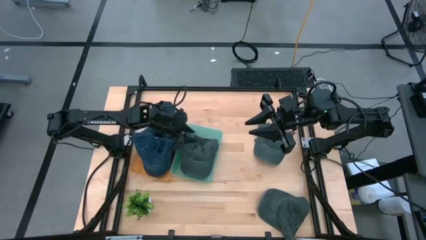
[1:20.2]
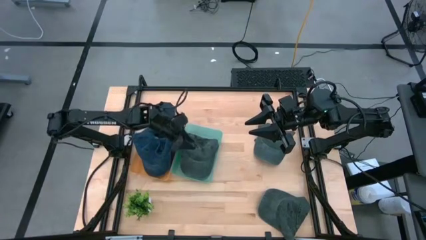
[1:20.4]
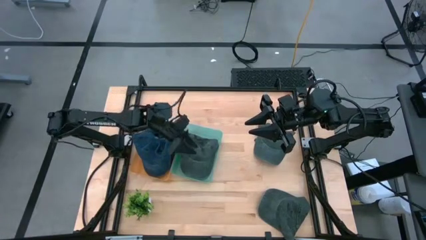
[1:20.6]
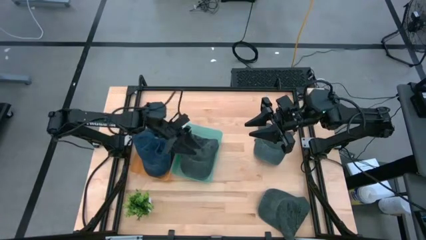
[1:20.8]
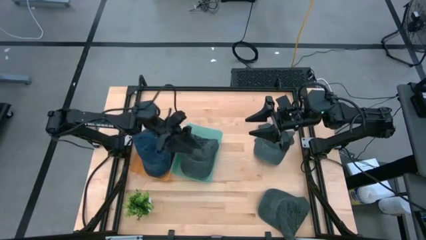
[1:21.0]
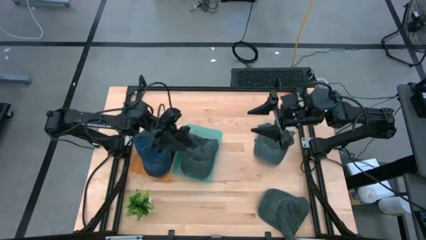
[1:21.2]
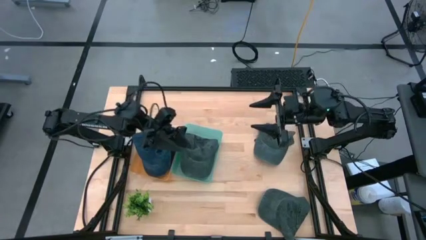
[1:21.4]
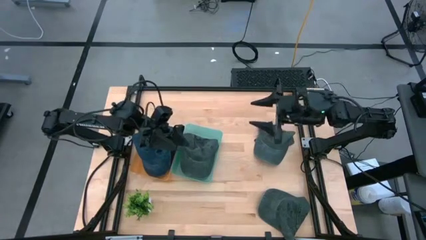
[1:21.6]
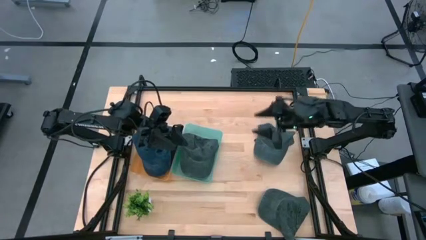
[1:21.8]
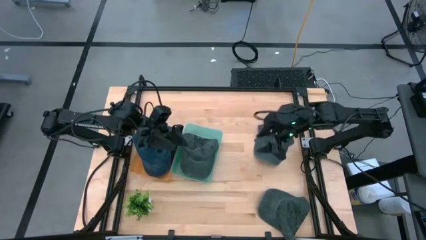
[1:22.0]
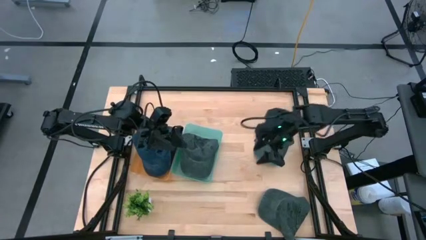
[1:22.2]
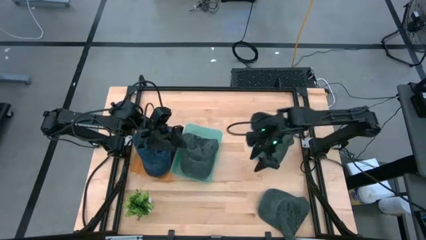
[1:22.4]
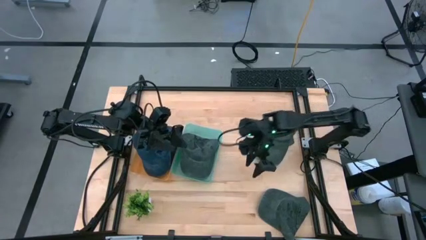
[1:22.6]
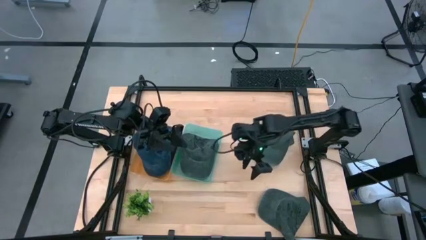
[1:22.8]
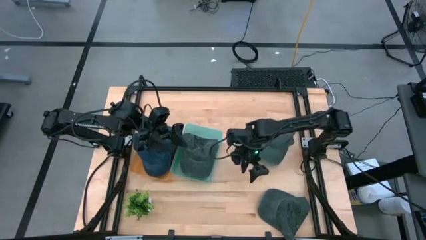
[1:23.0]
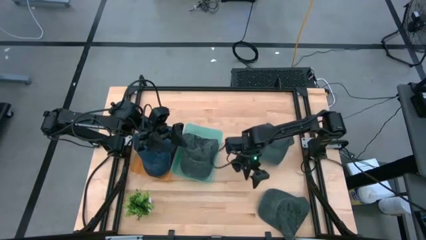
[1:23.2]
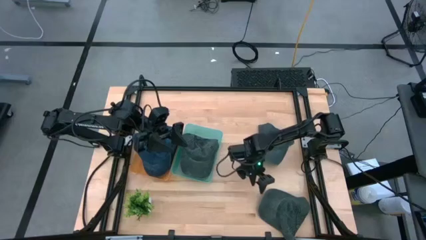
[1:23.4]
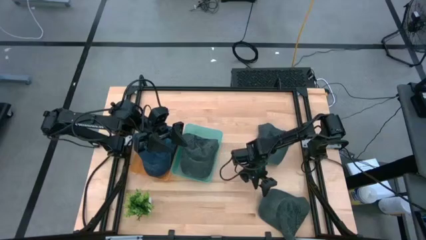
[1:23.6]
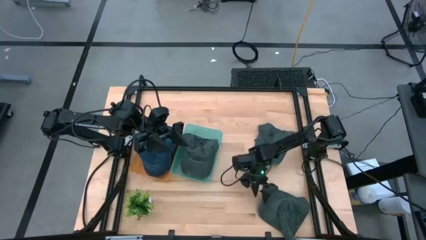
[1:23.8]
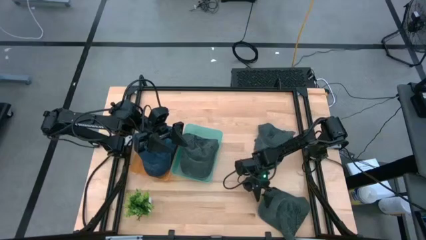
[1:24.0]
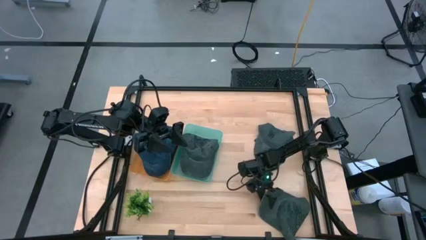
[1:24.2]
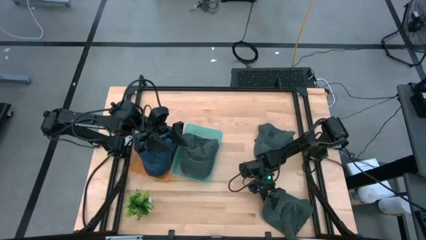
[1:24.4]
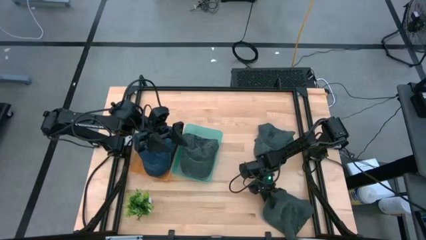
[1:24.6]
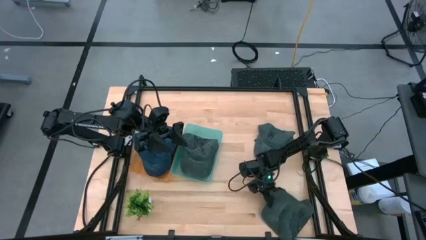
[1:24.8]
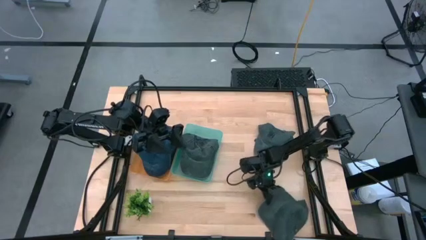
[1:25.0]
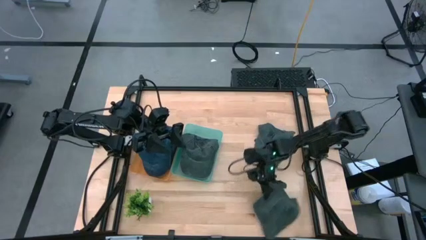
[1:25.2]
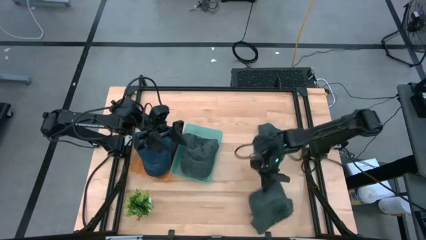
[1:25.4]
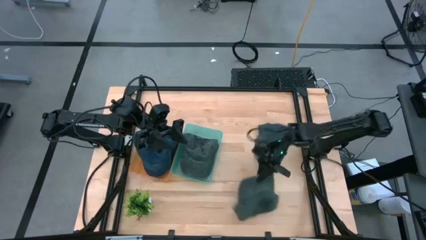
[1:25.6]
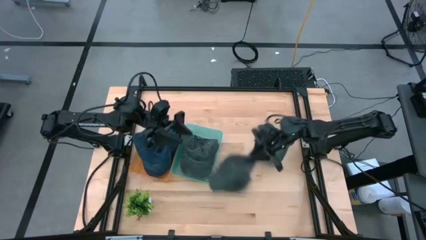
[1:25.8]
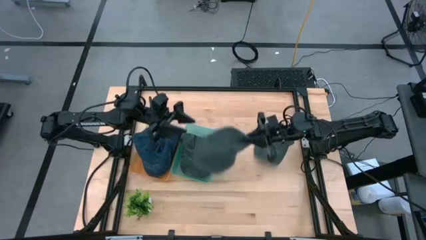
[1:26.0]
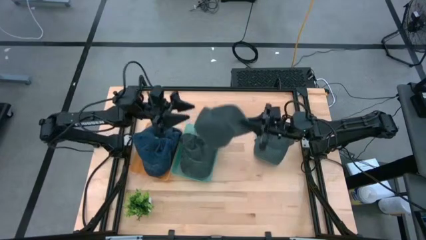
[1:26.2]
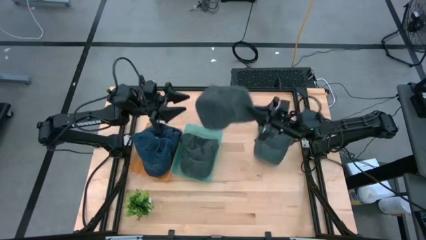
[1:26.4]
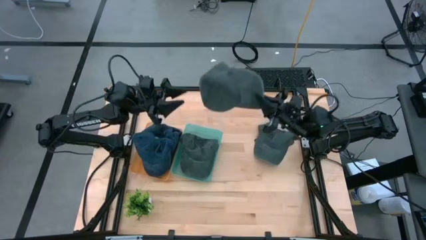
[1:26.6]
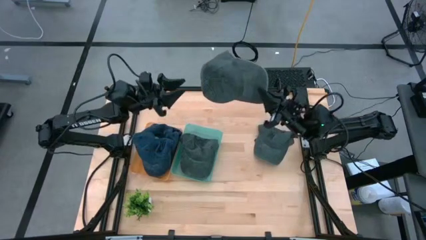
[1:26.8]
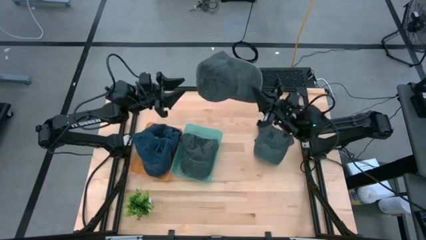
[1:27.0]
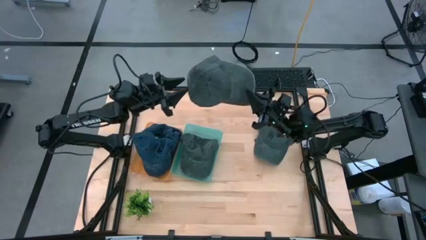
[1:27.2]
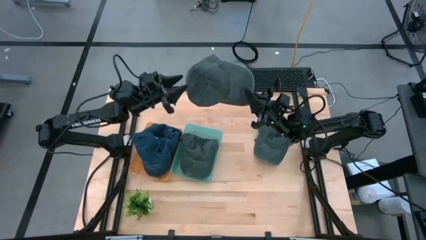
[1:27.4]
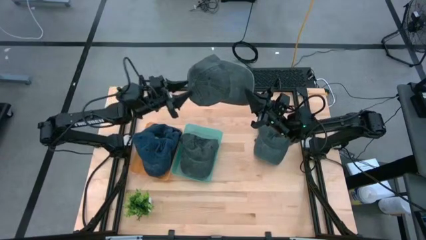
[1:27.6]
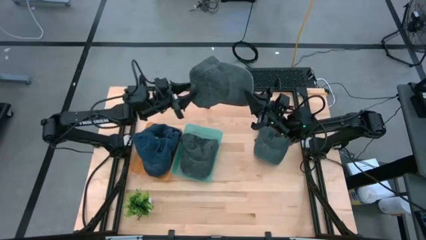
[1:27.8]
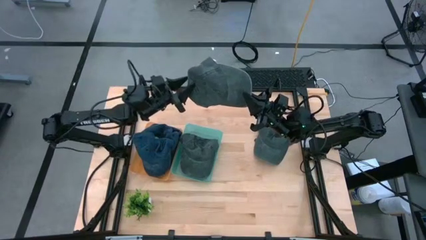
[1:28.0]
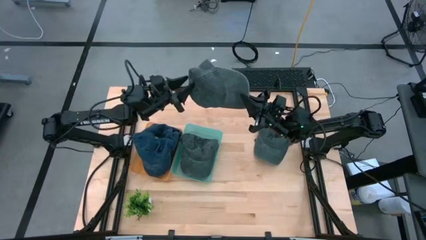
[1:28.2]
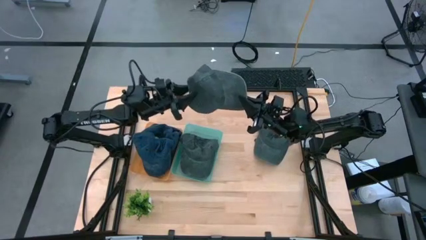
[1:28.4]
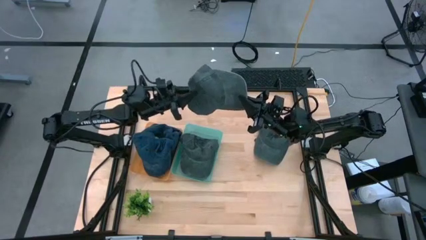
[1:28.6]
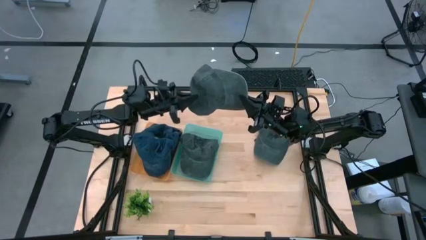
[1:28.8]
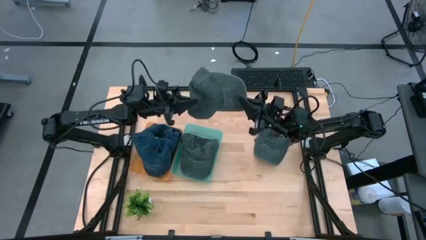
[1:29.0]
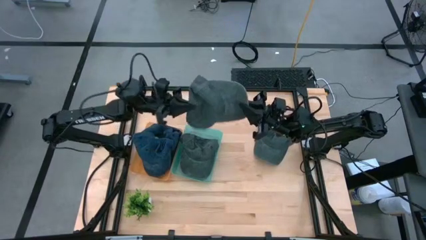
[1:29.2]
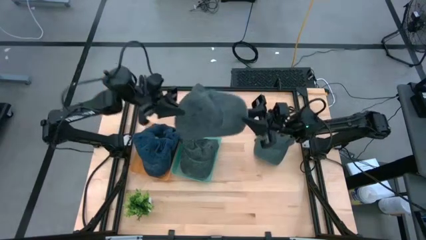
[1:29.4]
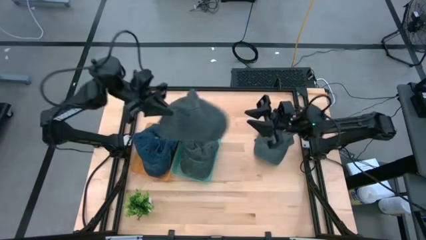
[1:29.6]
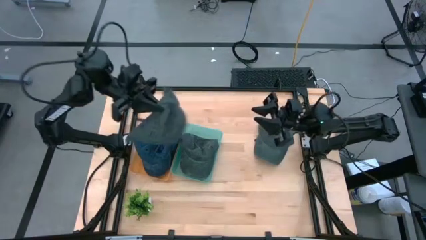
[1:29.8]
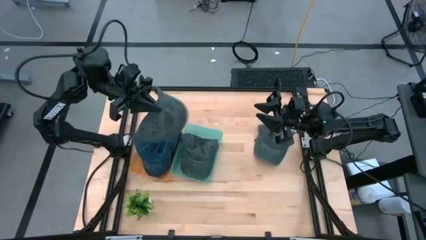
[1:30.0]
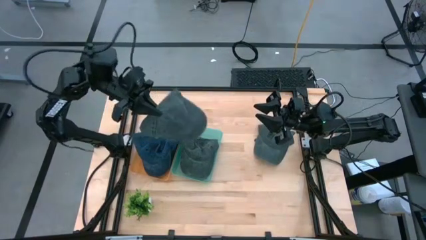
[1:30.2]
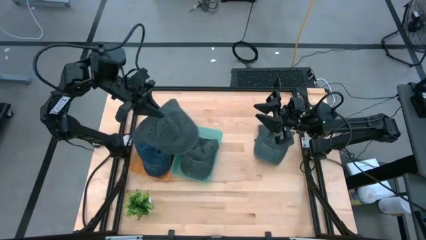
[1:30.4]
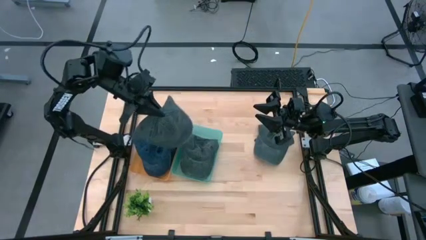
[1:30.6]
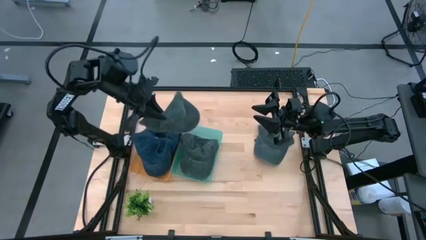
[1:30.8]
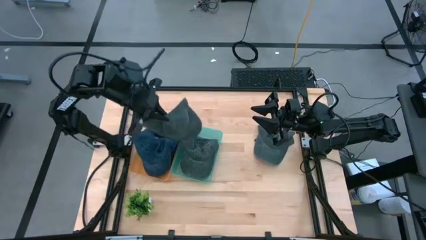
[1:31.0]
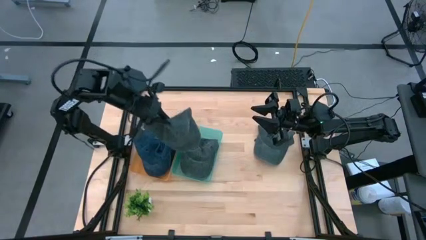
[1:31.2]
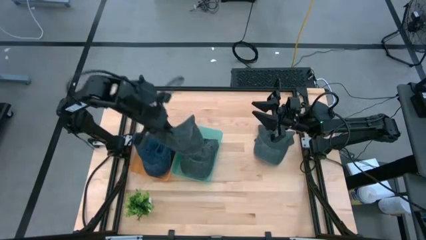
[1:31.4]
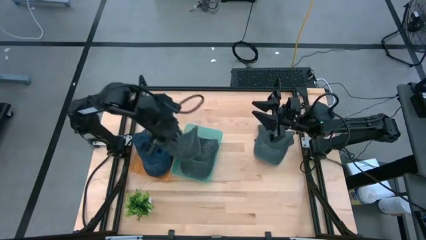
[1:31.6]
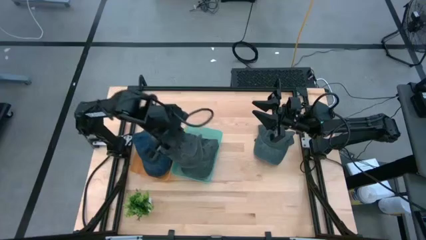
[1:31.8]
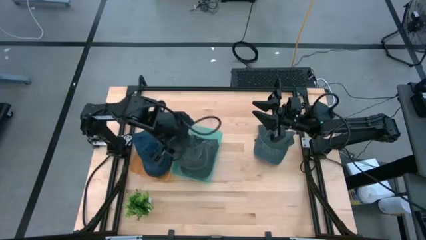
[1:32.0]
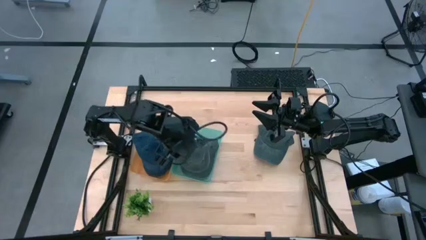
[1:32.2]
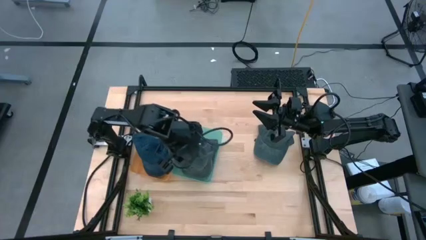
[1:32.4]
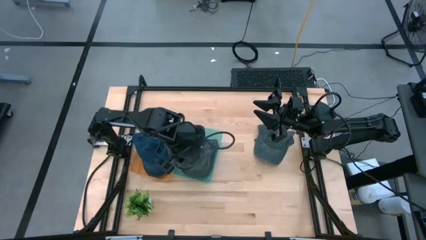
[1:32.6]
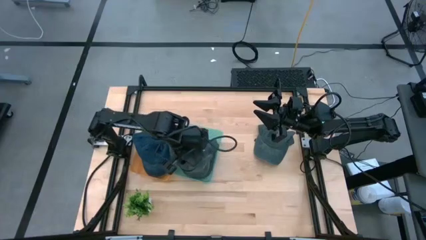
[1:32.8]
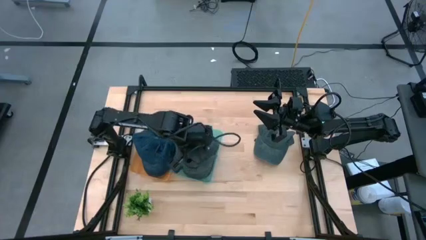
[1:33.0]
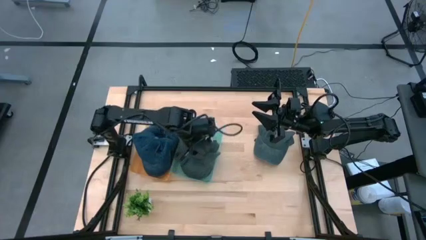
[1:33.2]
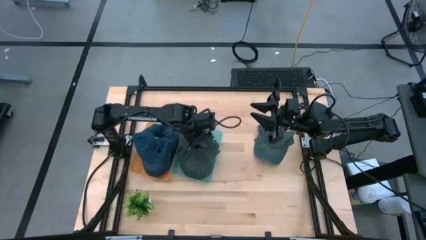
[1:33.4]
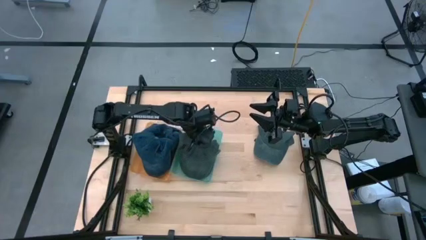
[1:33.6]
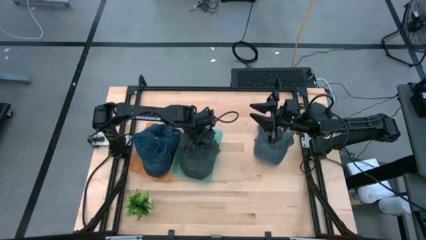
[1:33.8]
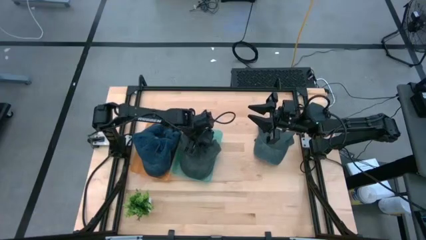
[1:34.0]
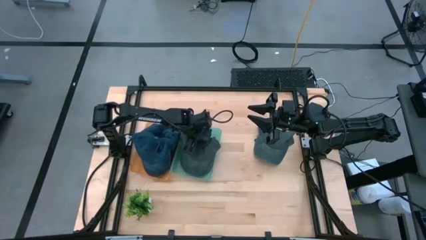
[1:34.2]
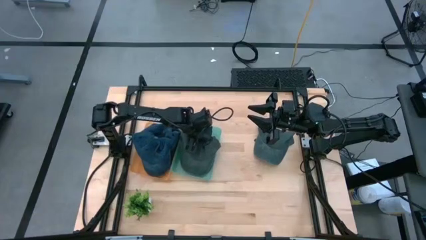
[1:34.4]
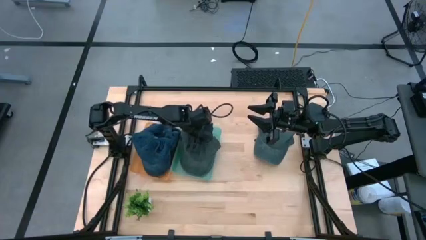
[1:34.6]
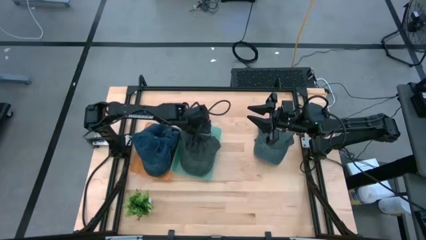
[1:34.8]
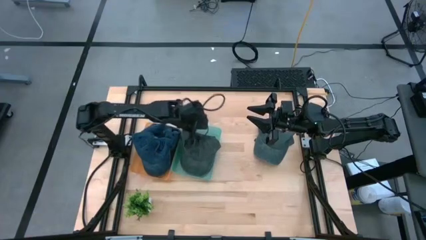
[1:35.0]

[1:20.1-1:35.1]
Task: Pick & Place hat
Put the bottom black cap into the green bin
